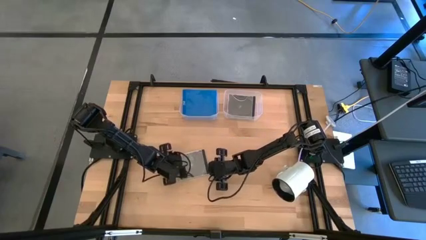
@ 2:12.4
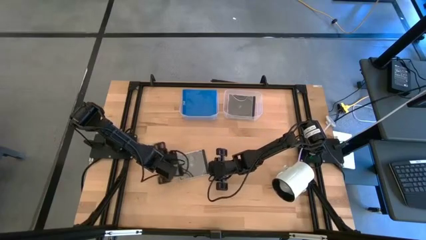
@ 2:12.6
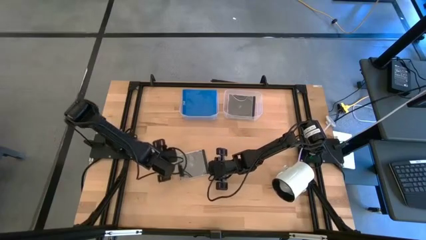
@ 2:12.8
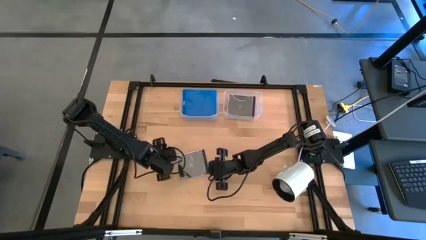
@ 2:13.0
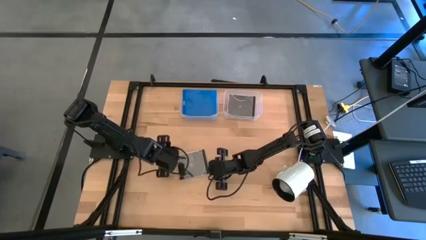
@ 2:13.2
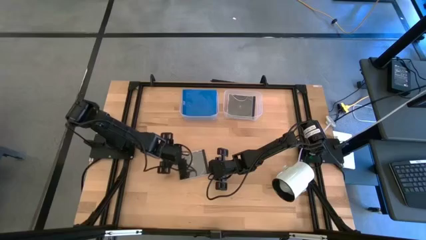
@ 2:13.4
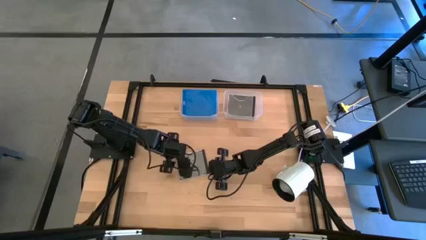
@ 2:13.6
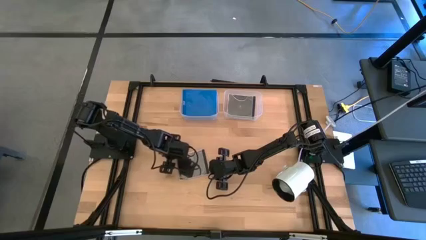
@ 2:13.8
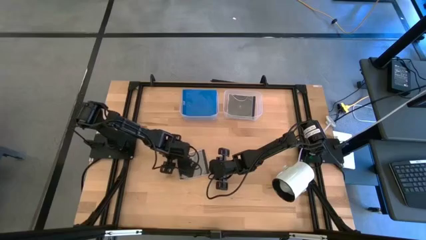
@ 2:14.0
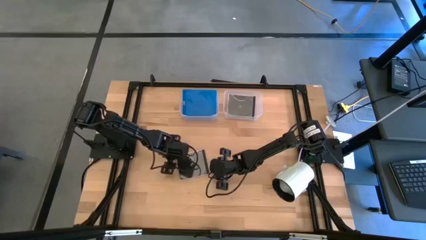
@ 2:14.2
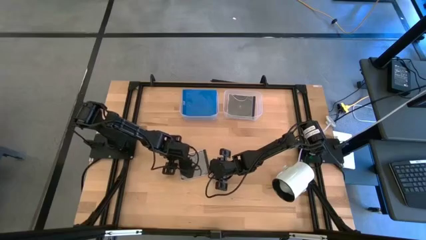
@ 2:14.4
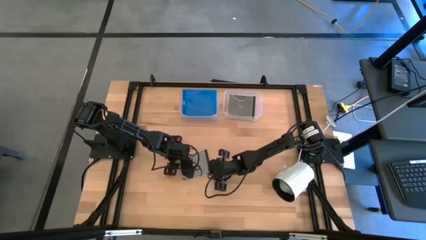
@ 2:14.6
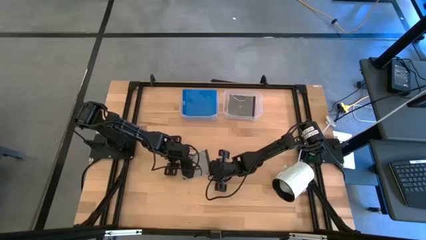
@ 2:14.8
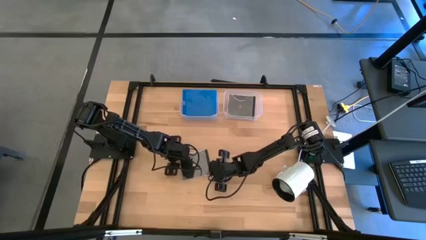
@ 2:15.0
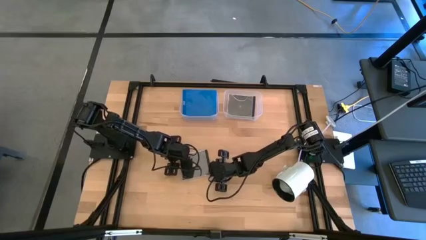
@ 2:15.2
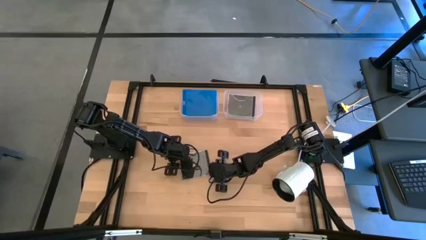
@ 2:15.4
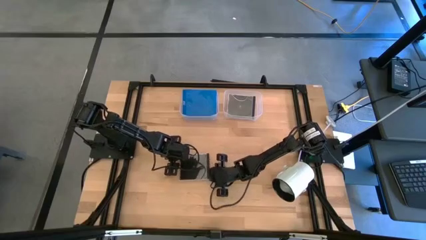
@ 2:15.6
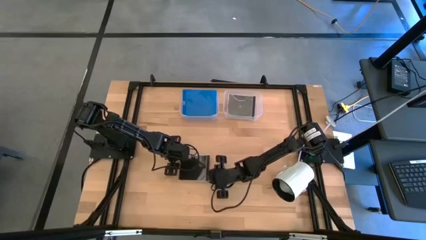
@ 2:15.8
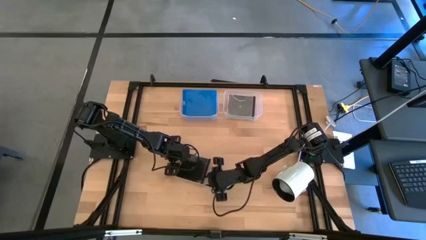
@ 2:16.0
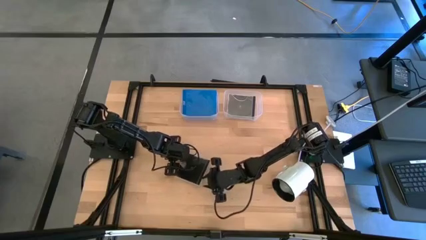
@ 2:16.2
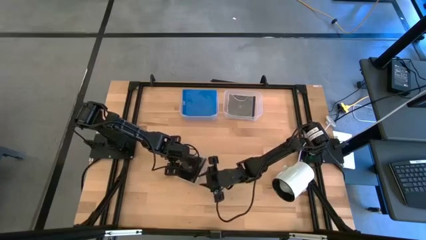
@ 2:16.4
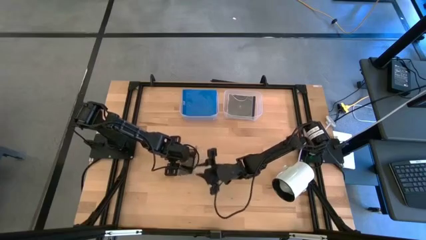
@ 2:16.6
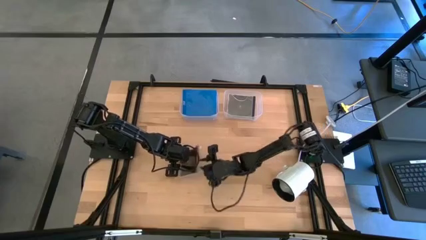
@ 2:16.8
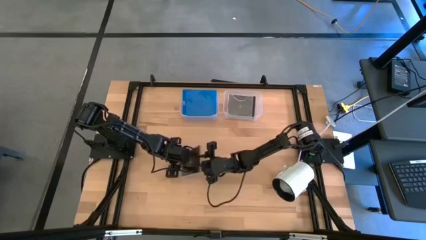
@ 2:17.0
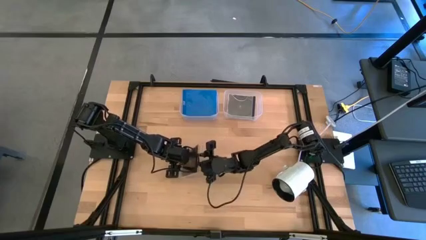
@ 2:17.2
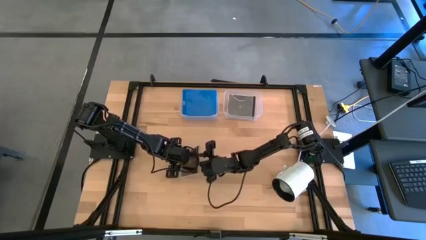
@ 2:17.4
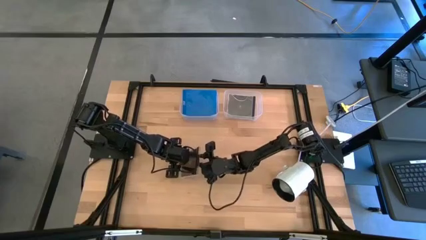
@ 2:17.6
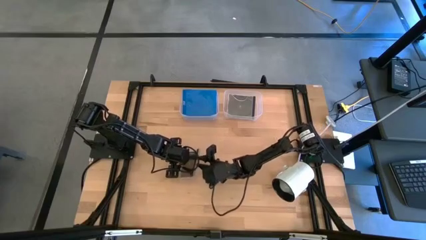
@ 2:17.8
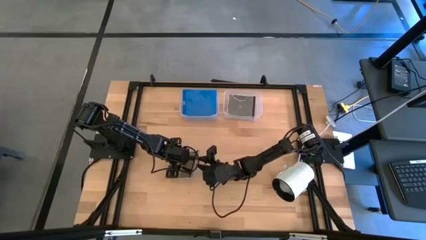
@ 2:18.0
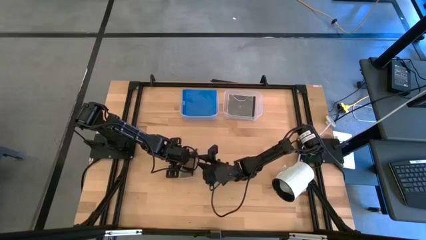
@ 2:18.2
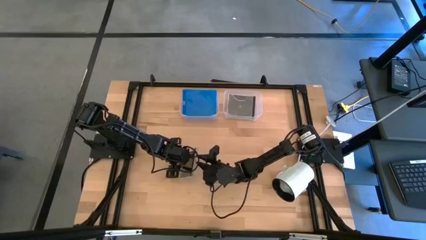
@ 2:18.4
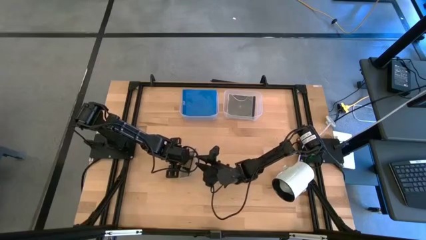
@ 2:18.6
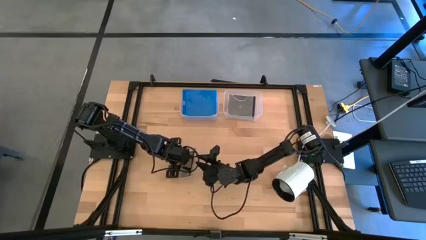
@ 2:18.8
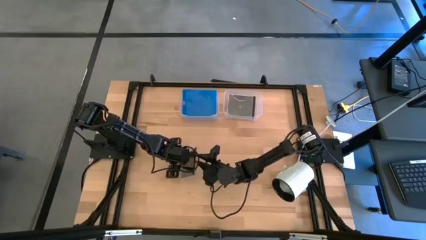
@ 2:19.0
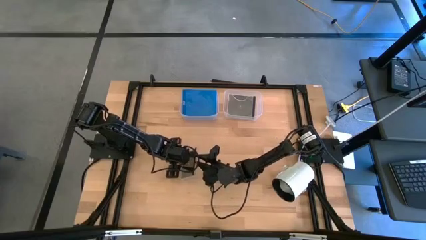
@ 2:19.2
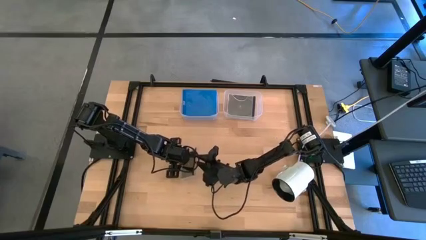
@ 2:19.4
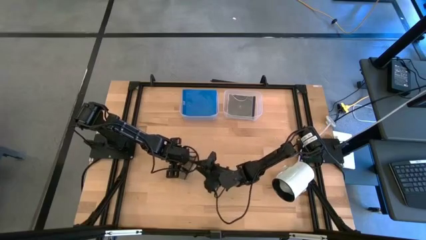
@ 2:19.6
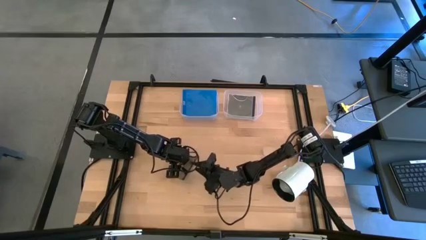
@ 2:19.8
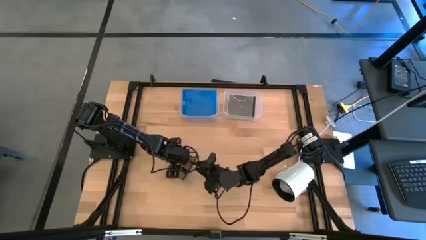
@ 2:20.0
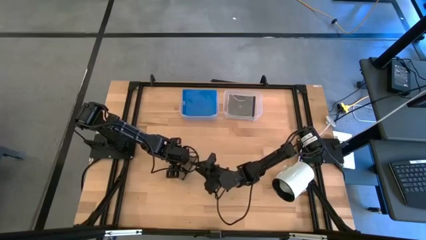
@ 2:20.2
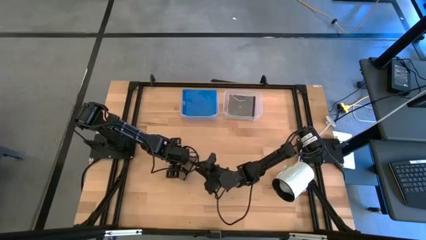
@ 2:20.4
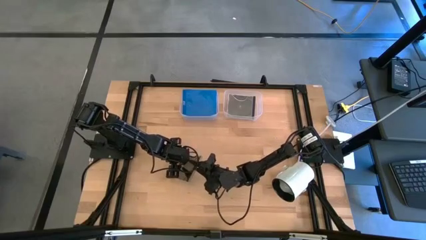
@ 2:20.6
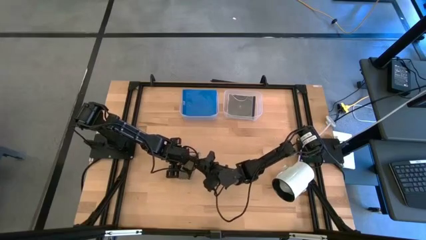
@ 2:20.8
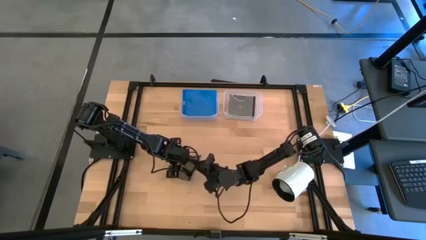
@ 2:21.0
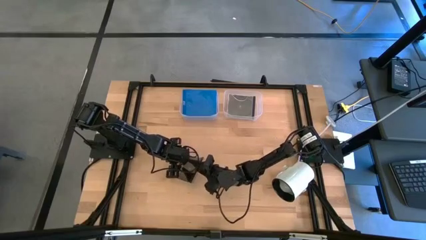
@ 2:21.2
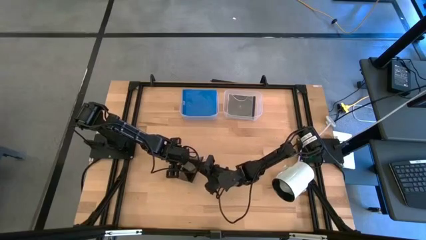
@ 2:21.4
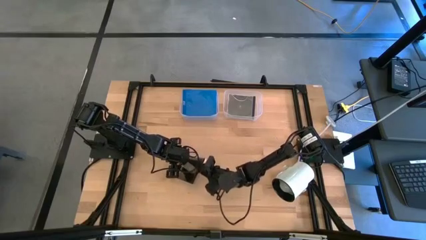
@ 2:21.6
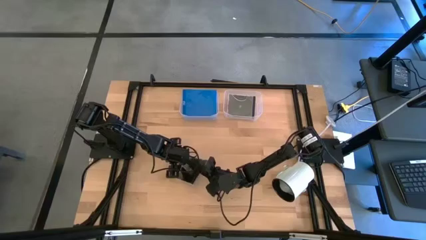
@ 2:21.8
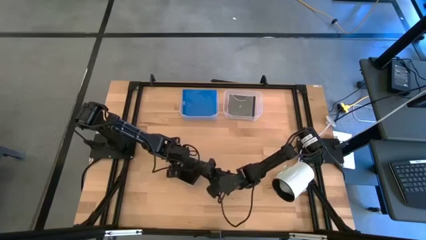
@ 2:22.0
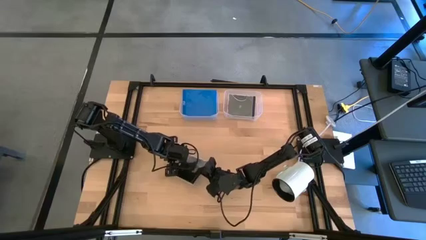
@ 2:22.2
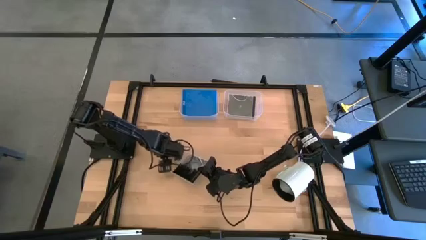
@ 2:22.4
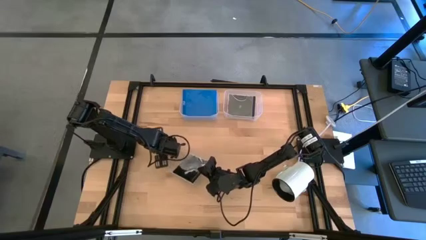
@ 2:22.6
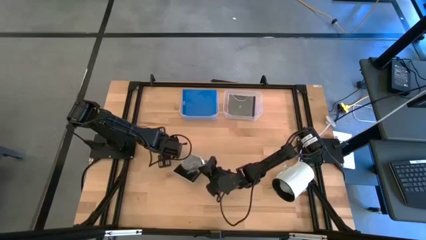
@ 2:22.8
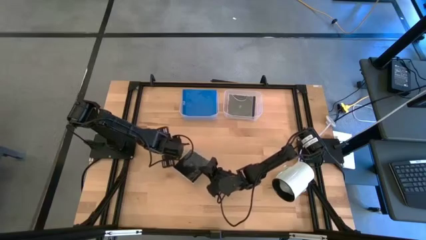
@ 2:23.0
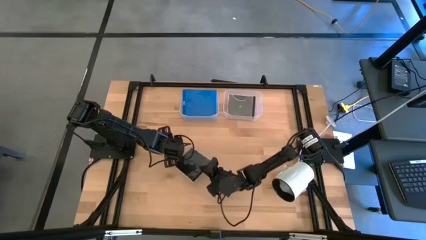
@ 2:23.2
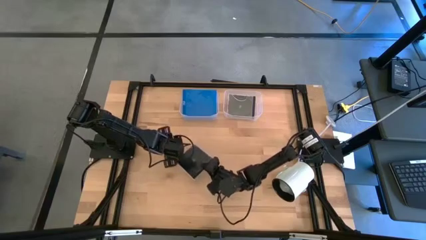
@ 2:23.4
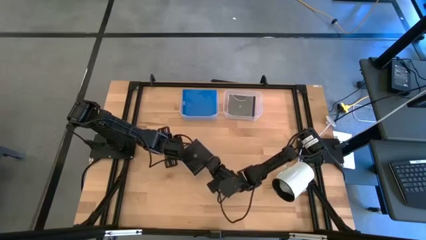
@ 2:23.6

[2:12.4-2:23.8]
Task: Pick & place jewel cases by type
Put the black CD case into the transparent bin
